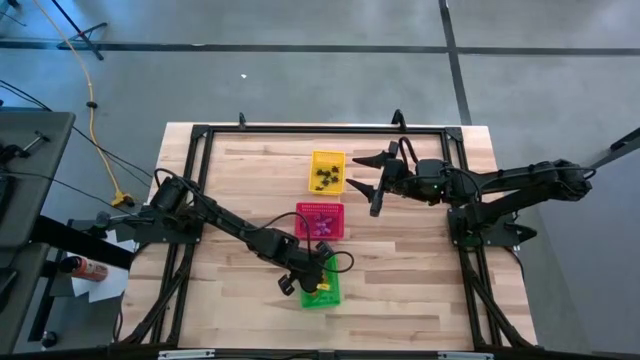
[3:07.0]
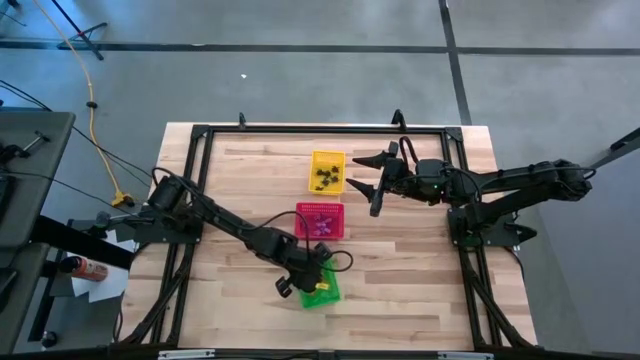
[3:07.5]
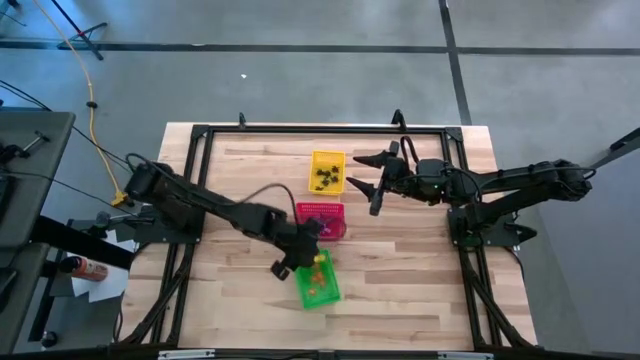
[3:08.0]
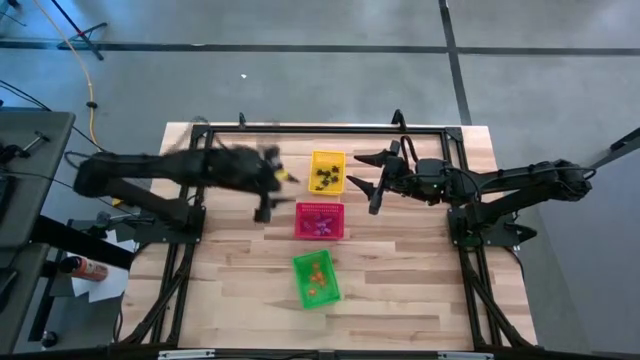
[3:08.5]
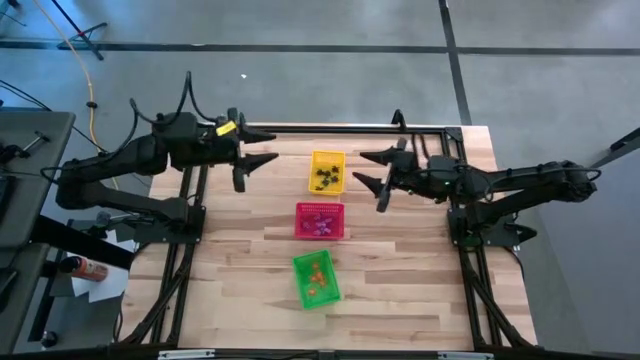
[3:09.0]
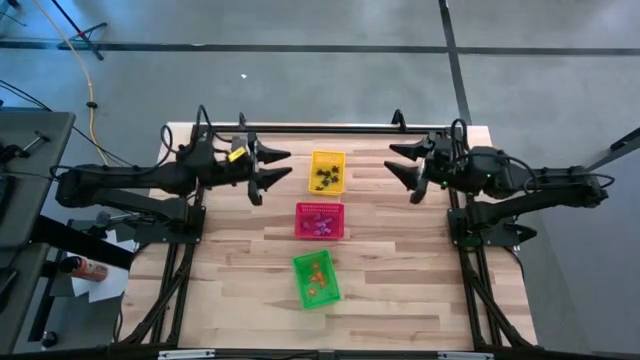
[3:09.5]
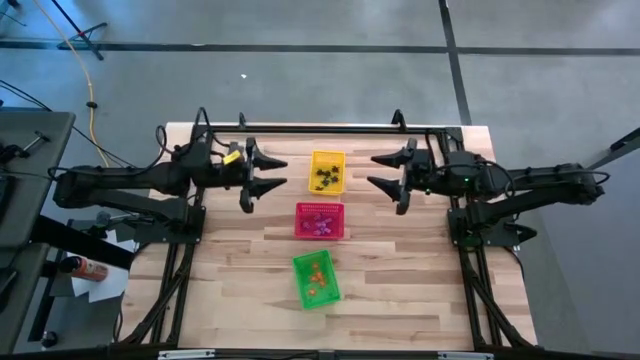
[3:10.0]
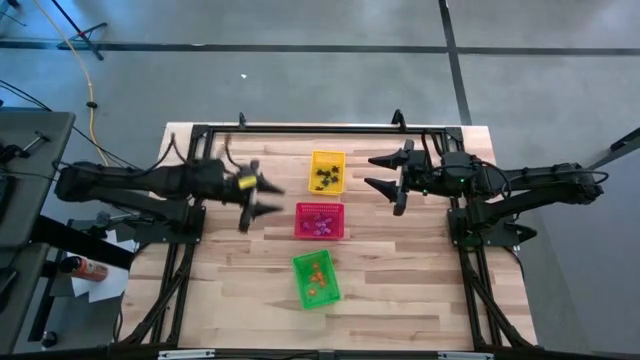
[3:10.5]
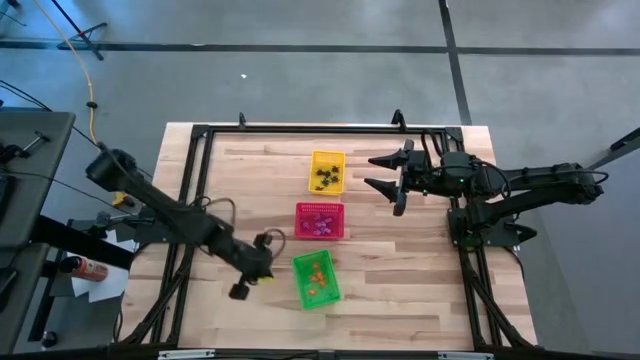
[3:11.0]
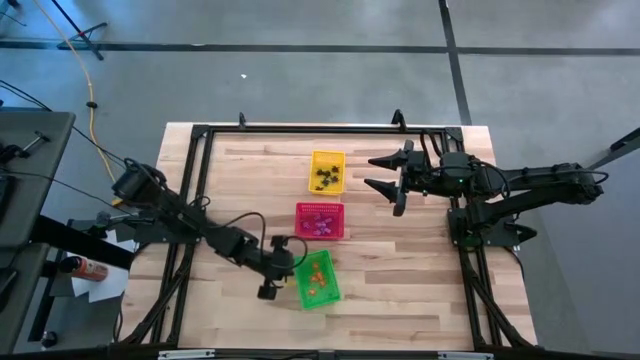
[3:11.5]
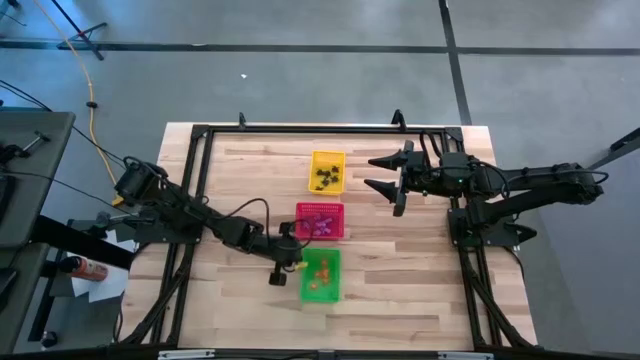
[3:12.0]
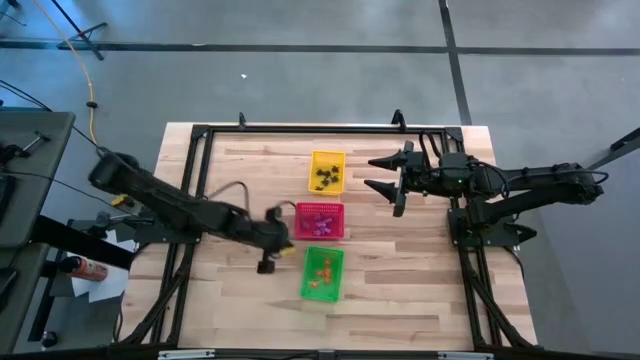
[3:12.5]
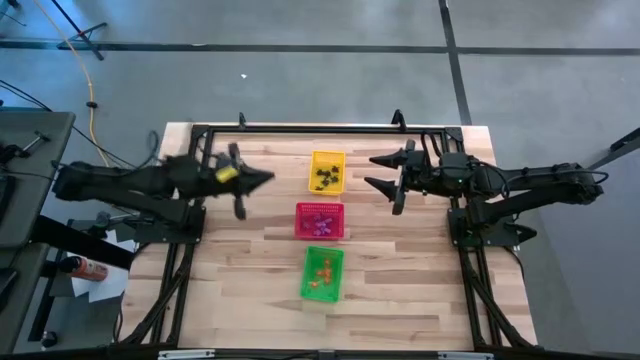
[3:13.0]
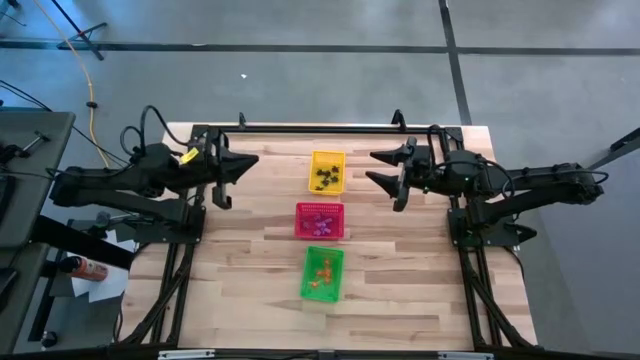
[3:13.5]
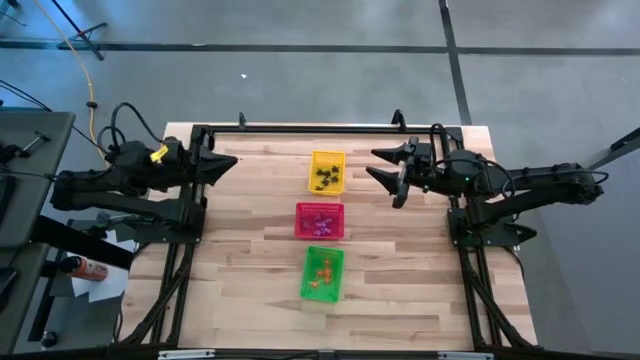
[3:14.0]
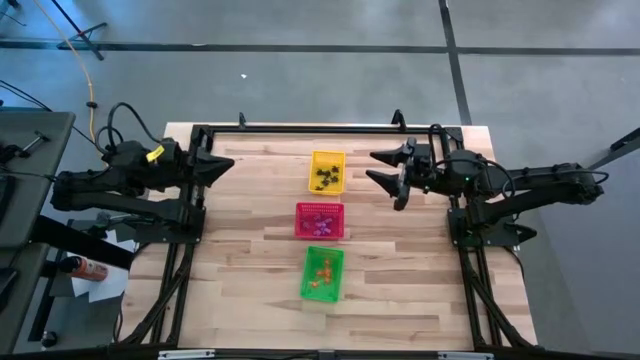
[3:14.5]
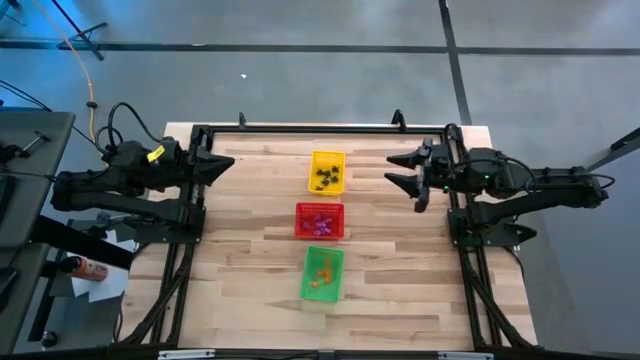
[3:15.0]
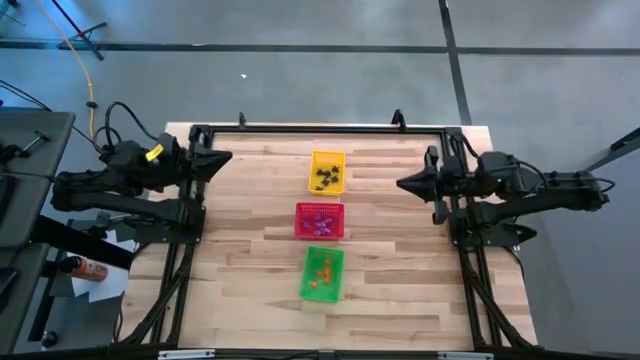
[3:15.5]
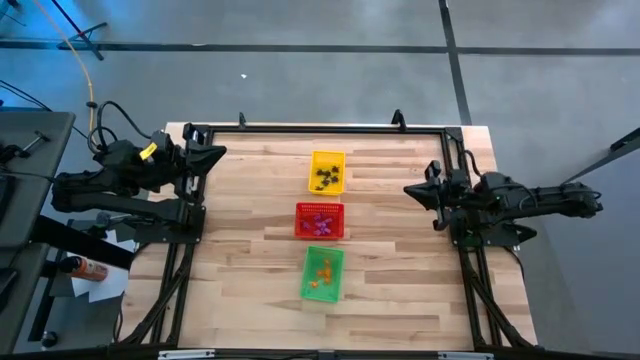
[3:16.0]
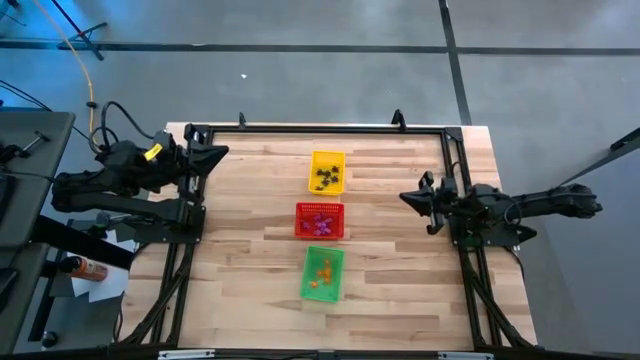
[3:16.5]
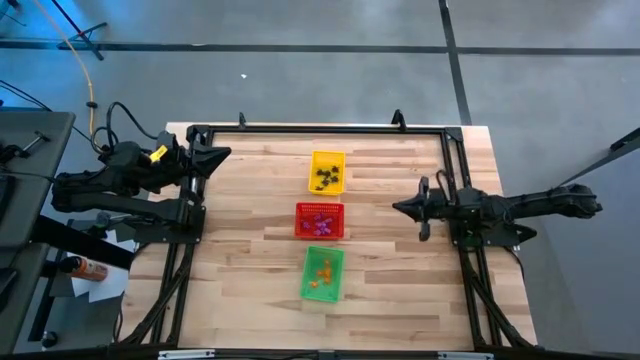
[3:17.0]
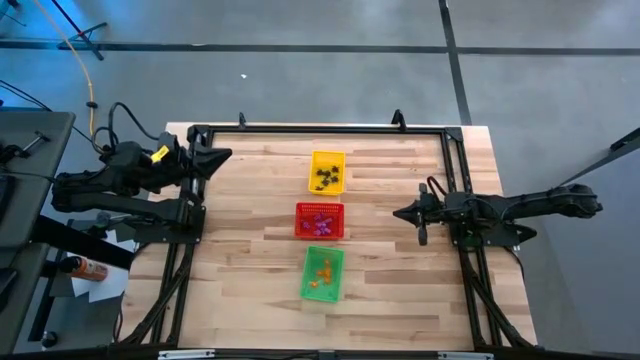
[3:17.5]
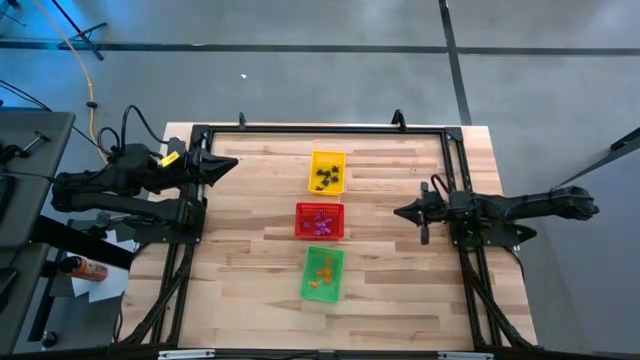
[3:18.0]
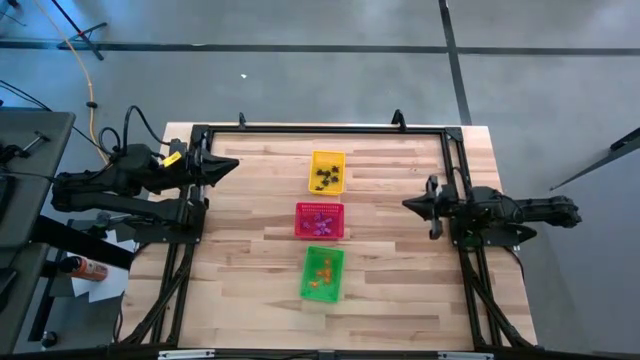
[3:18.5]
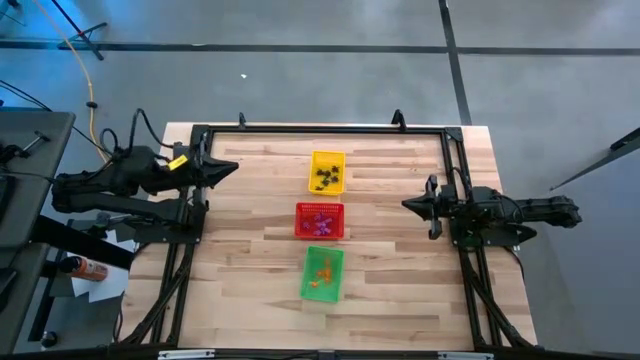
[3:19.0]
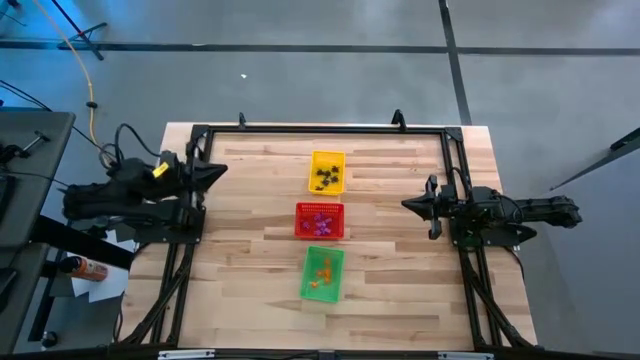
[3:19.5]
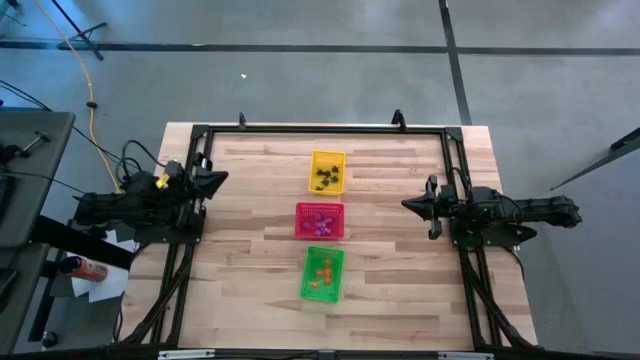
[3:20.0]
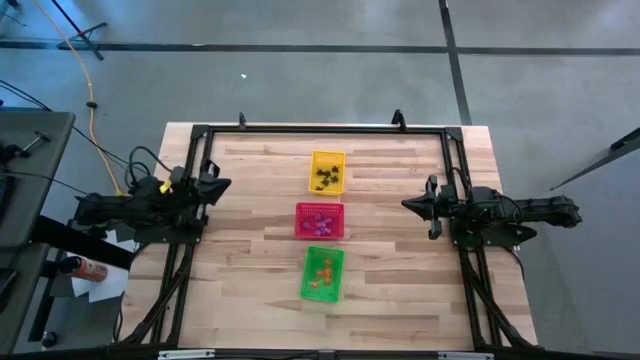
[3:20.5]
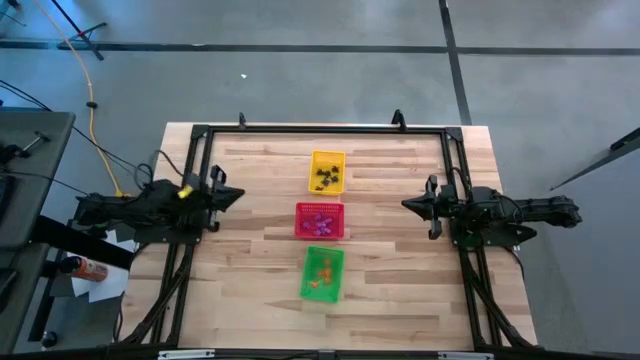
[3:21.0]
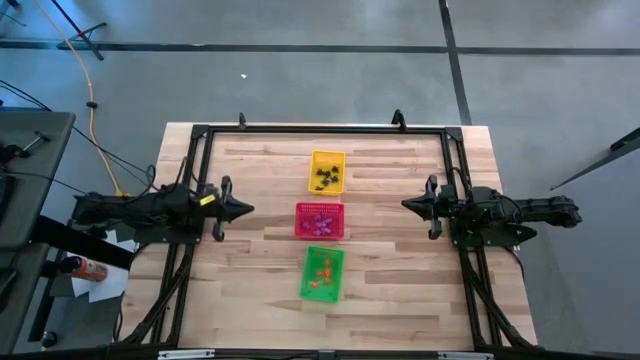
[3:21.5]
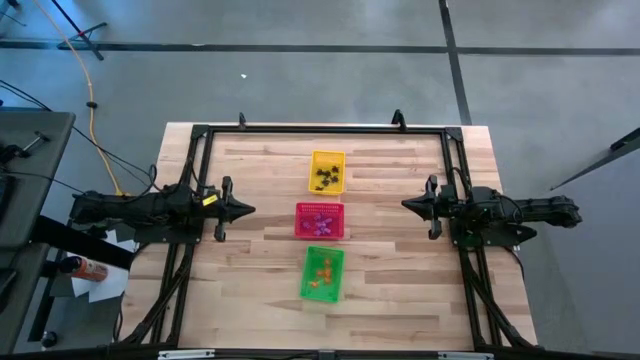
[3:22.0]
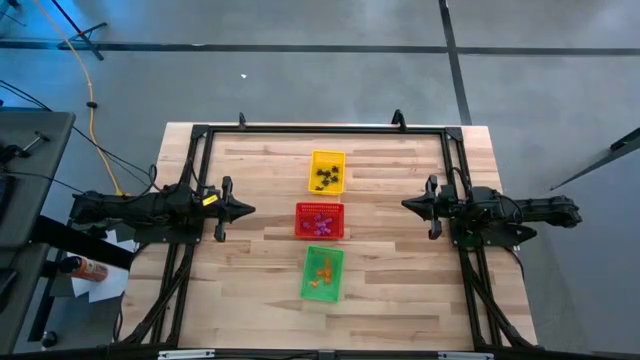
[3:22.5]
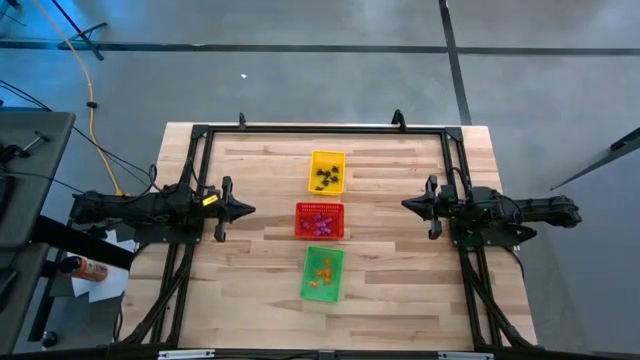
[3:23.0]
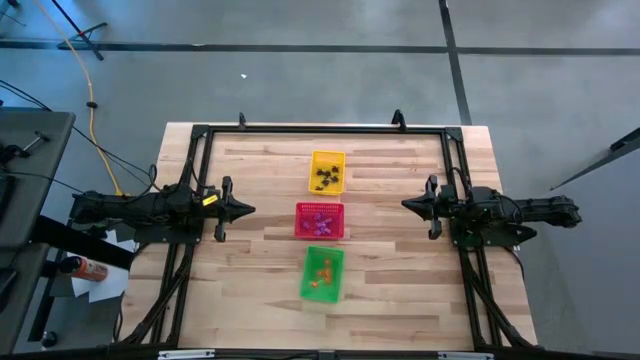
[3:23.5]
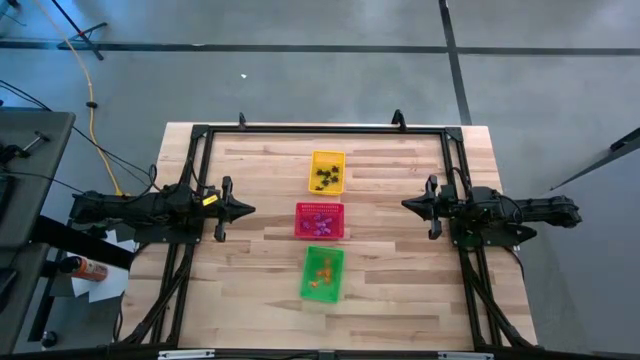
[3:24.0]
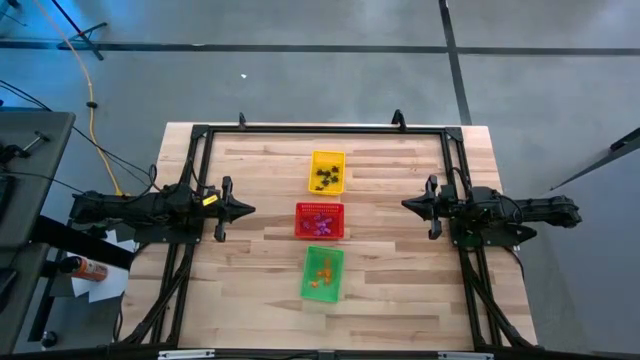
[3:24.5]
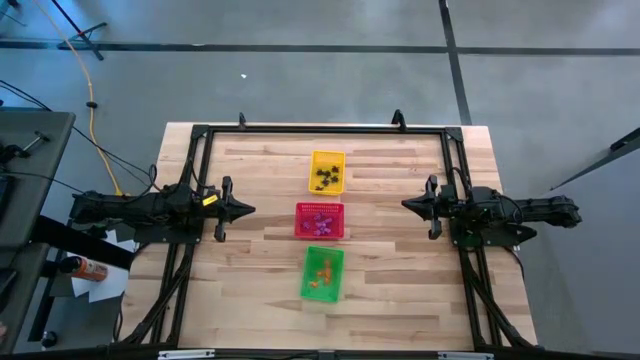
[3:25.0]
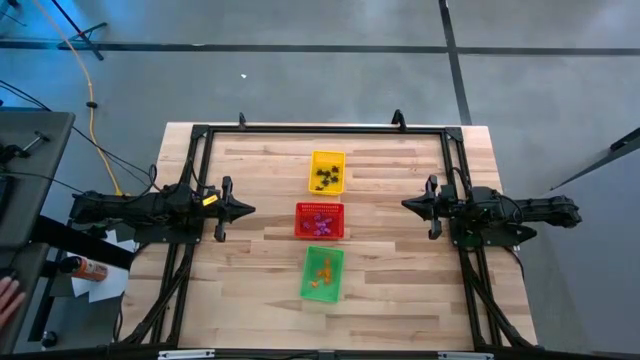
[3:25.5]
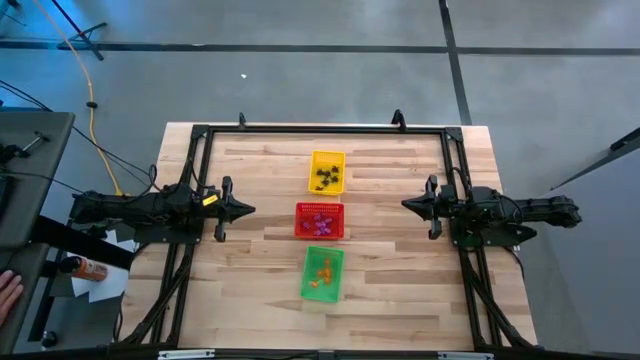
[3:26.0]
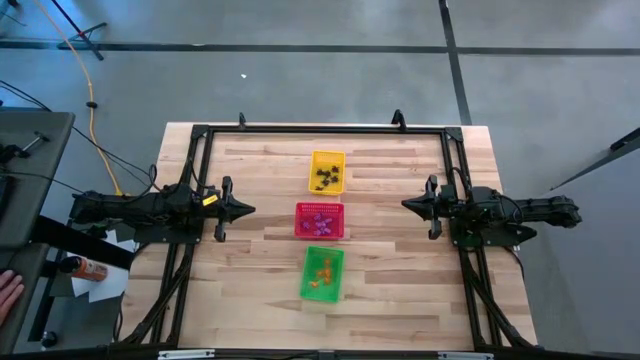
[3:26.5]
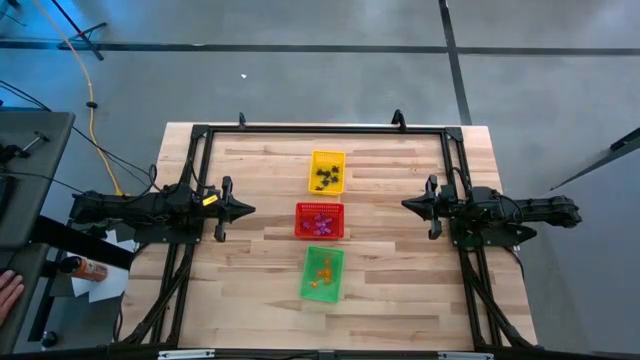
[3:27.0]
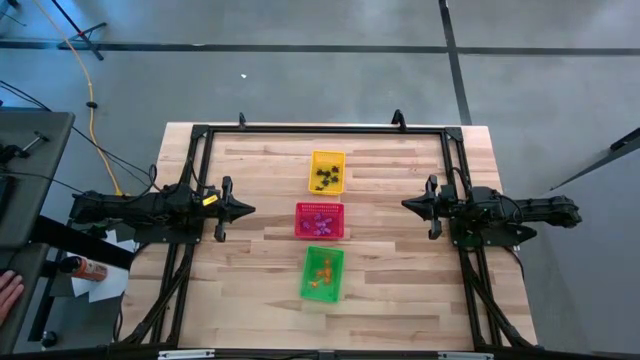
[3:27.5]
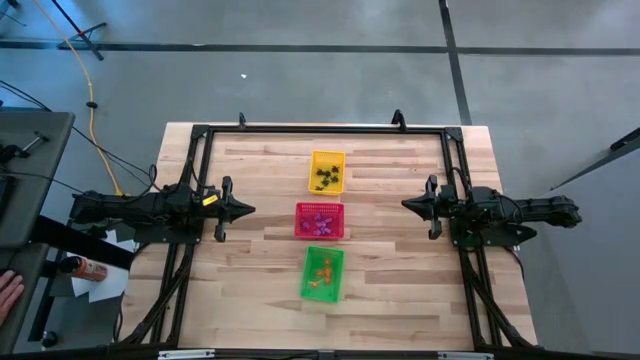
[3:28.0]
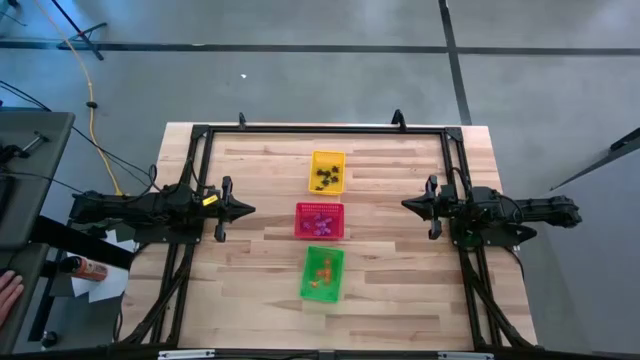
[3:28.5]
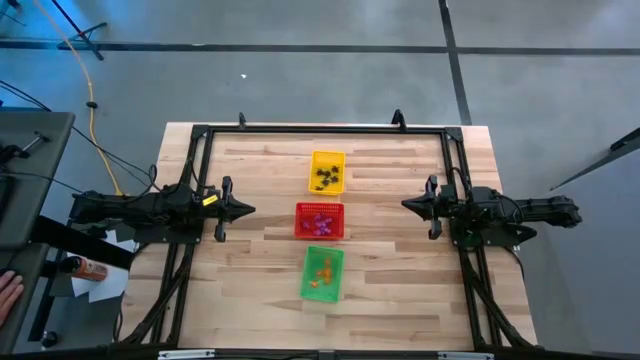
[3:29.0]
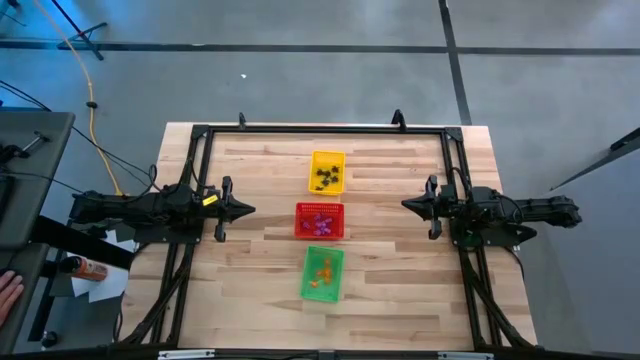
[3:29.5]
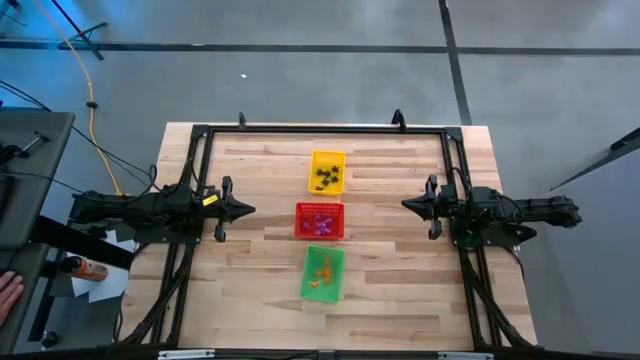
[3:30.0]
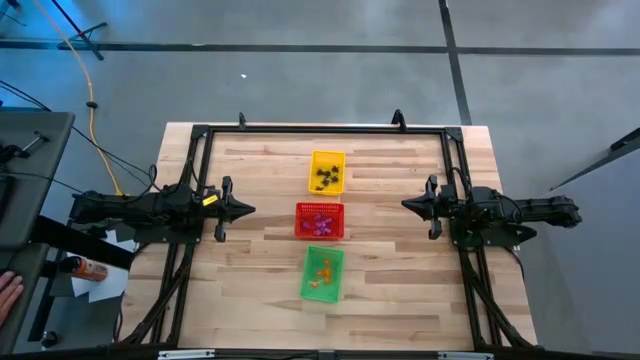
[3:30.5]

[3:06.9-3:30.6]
Task: Sort Halloween decoration
Return to Home Position
